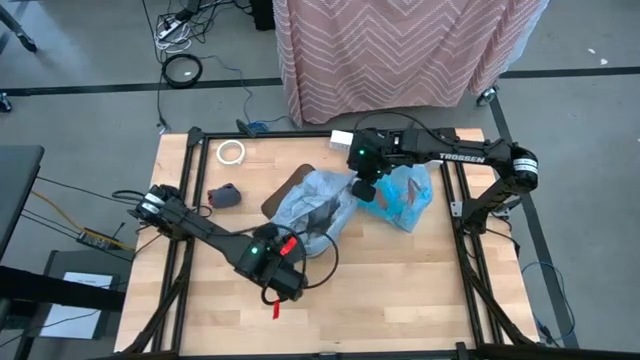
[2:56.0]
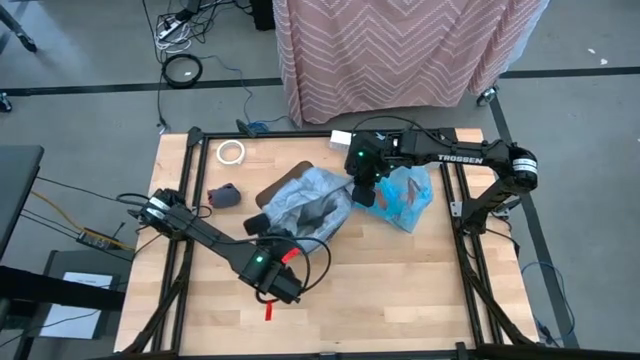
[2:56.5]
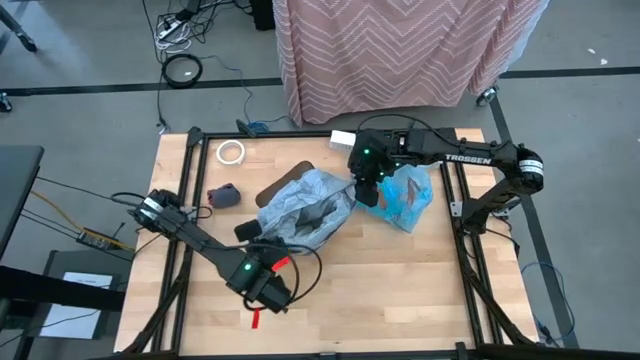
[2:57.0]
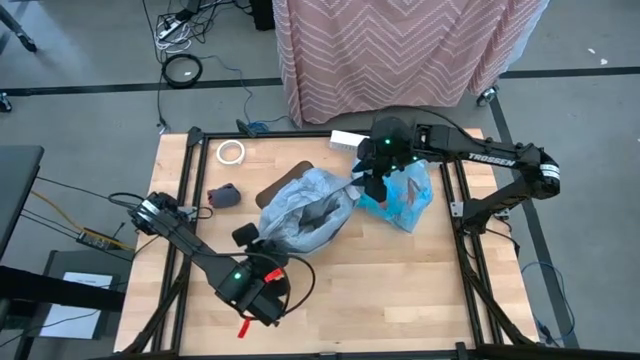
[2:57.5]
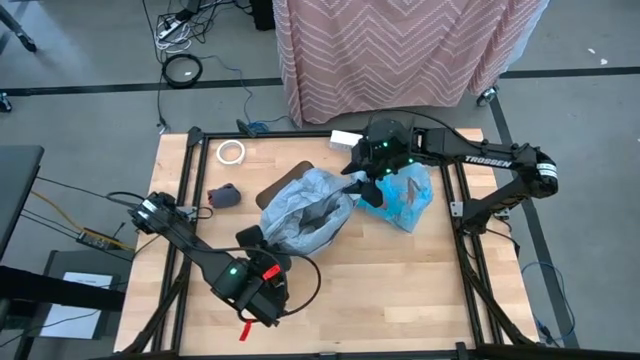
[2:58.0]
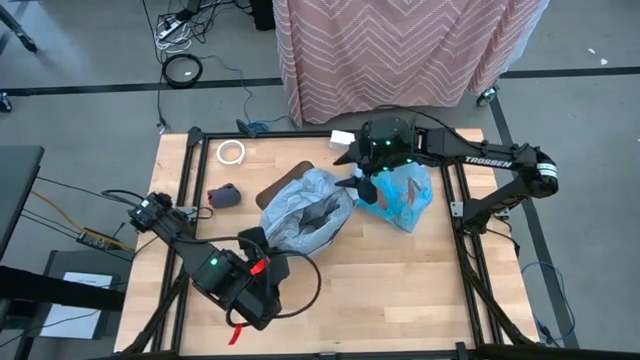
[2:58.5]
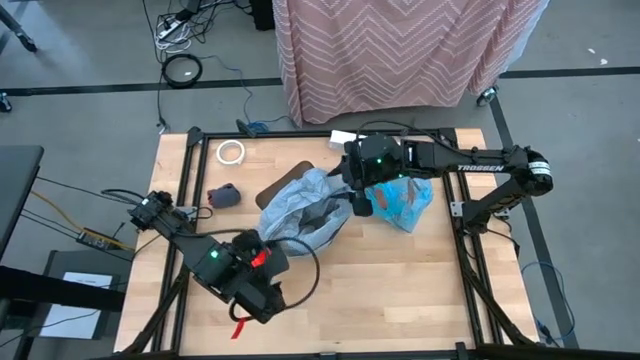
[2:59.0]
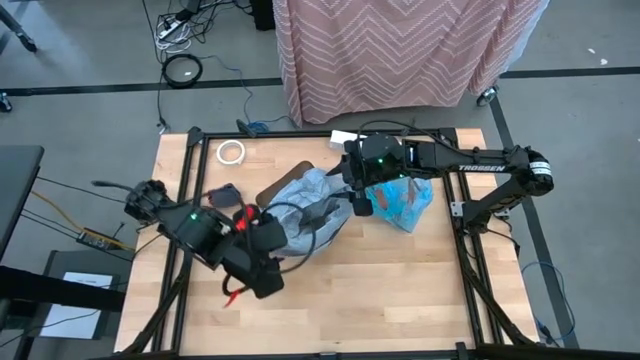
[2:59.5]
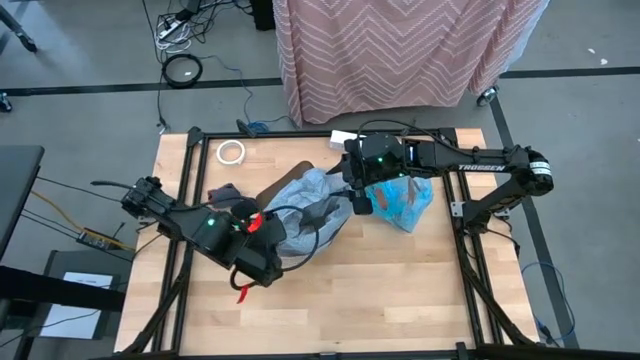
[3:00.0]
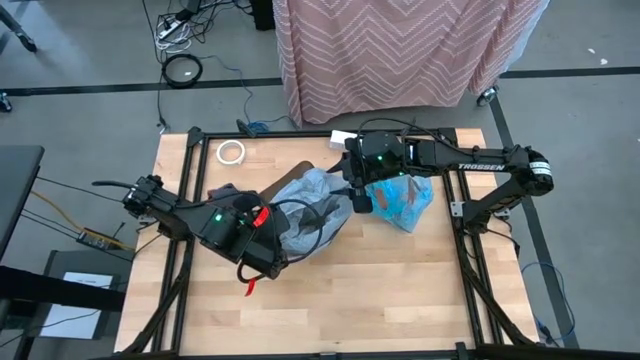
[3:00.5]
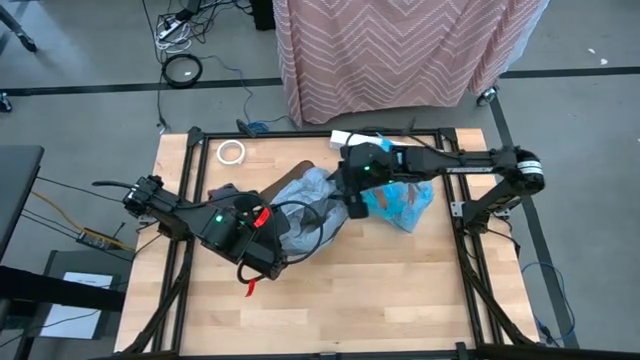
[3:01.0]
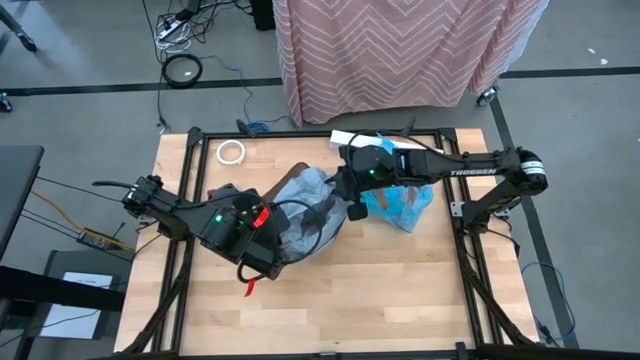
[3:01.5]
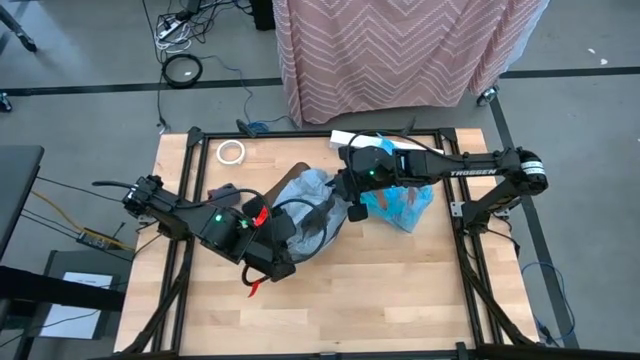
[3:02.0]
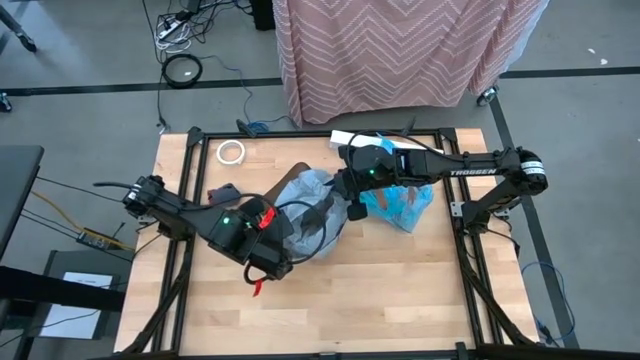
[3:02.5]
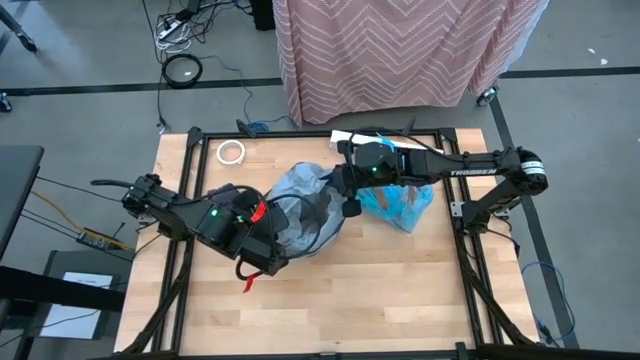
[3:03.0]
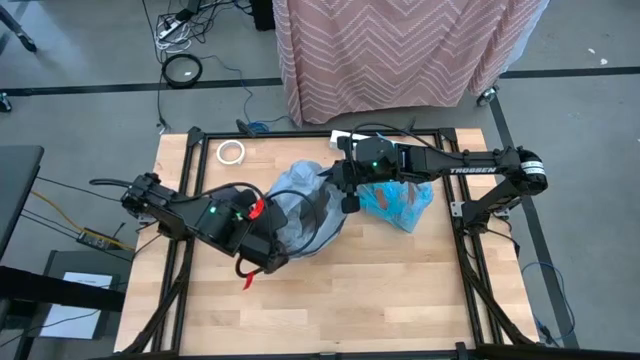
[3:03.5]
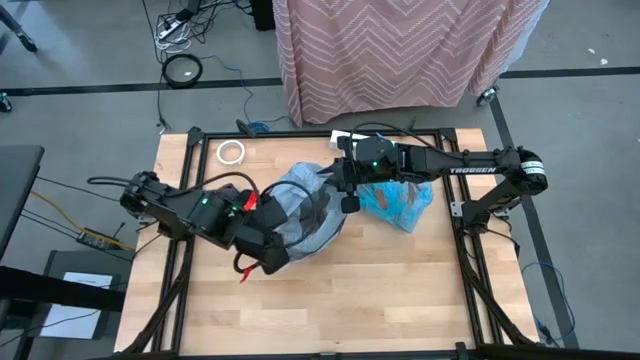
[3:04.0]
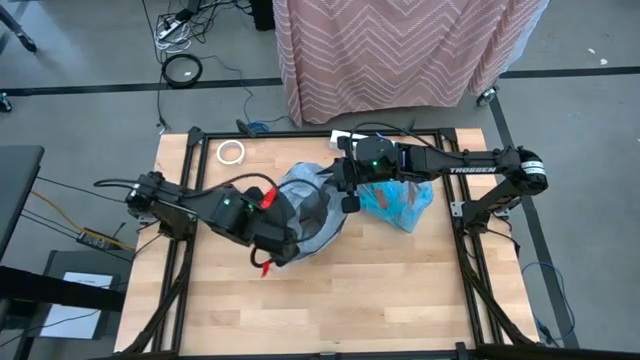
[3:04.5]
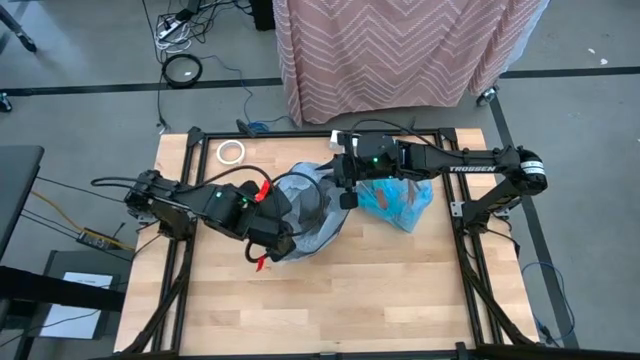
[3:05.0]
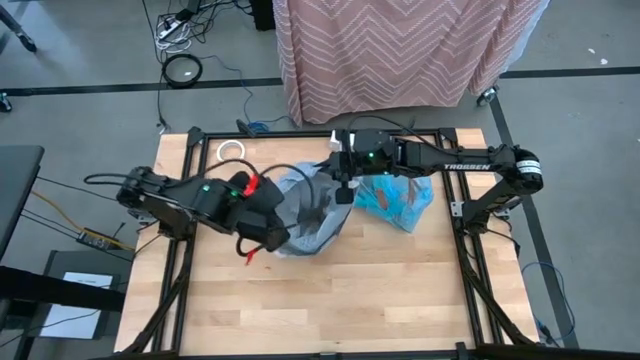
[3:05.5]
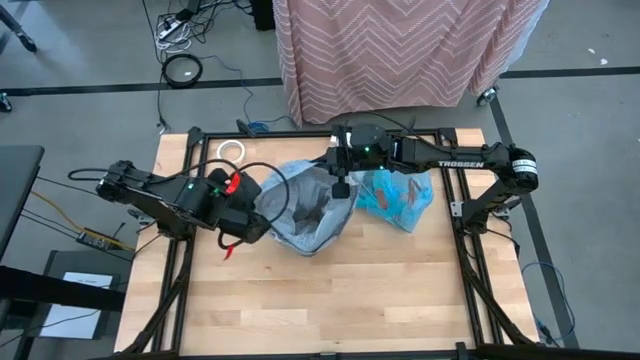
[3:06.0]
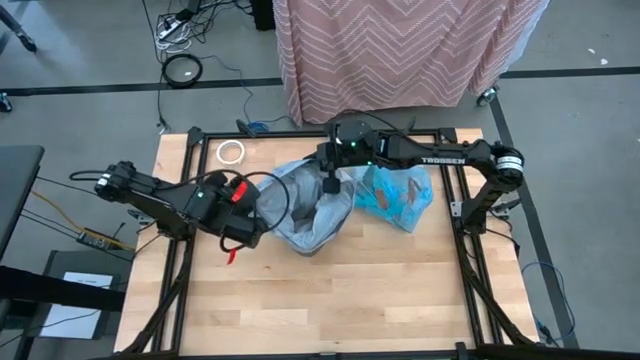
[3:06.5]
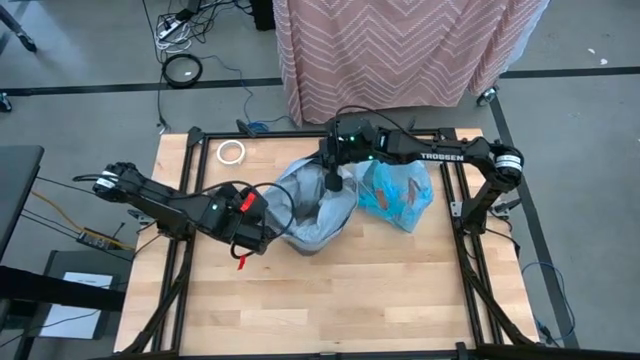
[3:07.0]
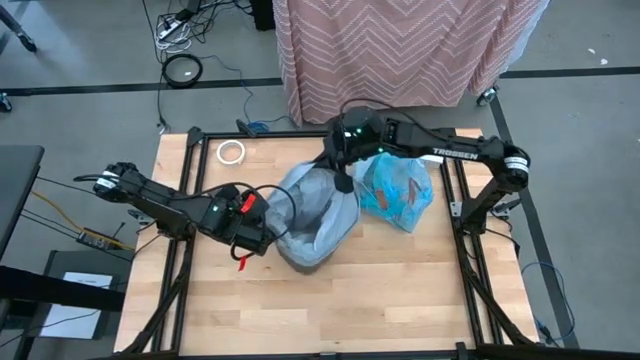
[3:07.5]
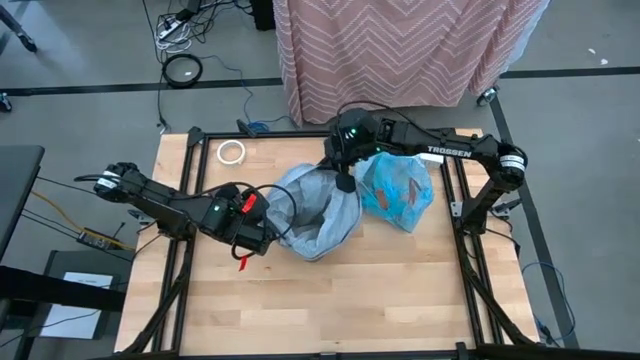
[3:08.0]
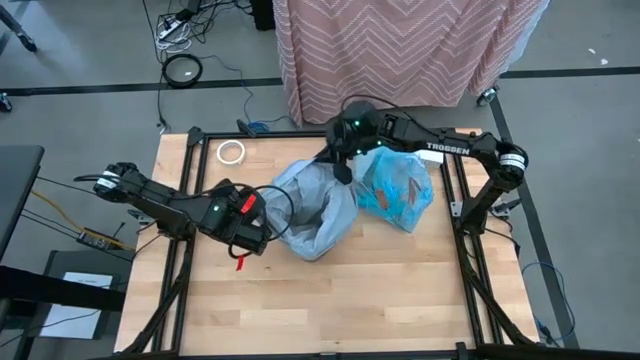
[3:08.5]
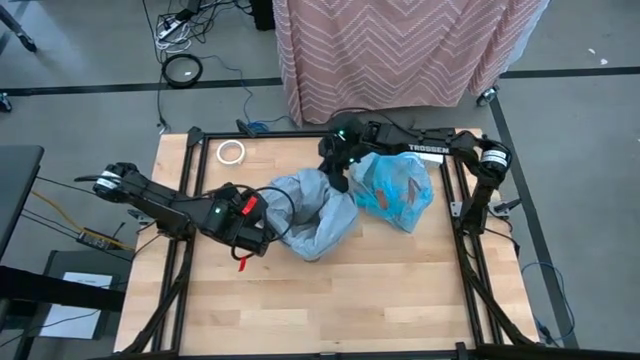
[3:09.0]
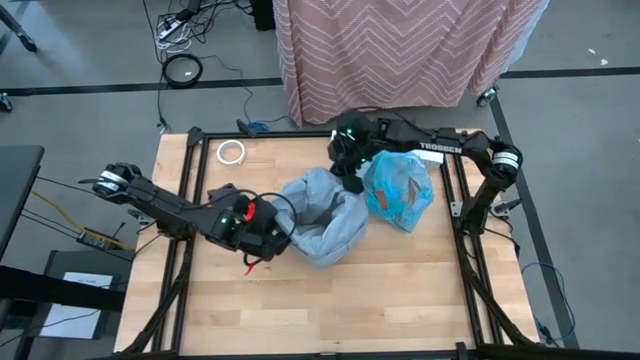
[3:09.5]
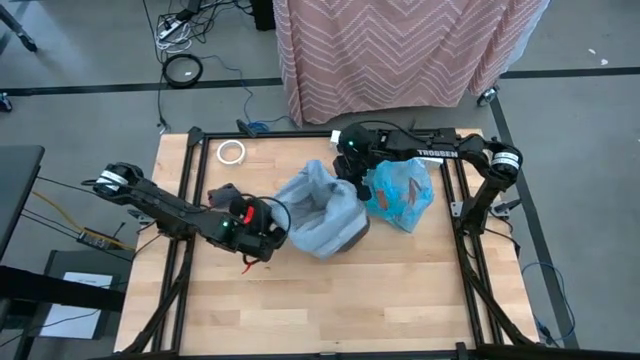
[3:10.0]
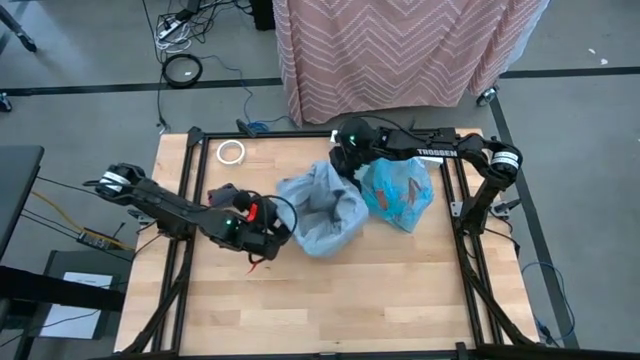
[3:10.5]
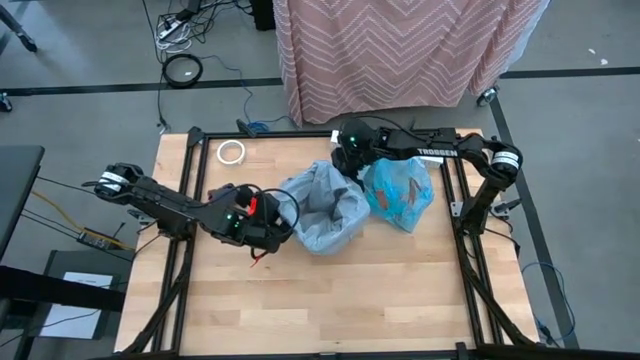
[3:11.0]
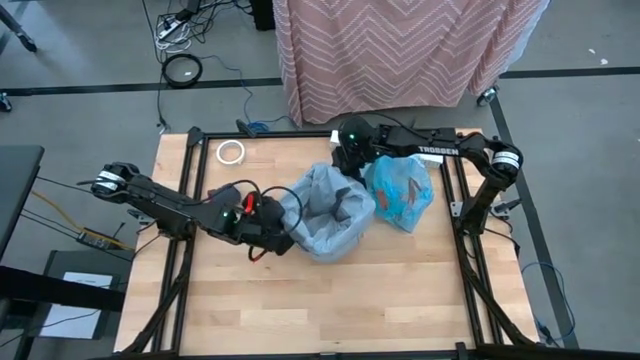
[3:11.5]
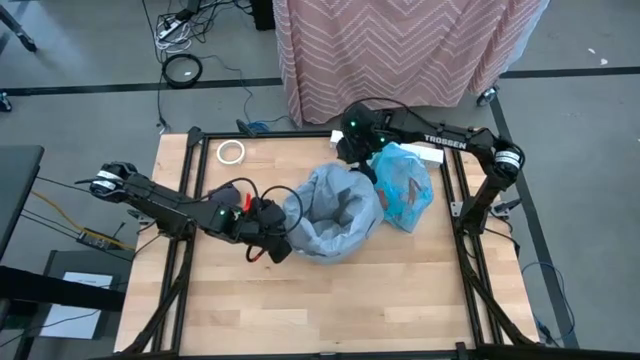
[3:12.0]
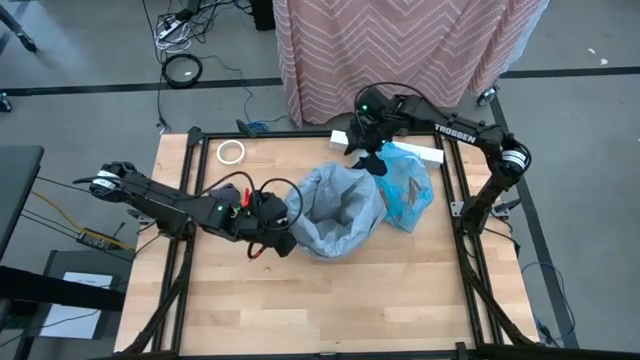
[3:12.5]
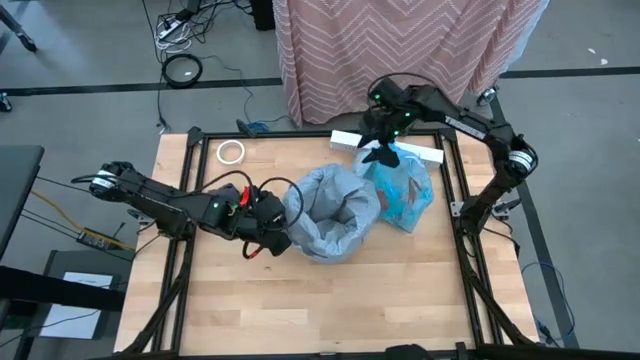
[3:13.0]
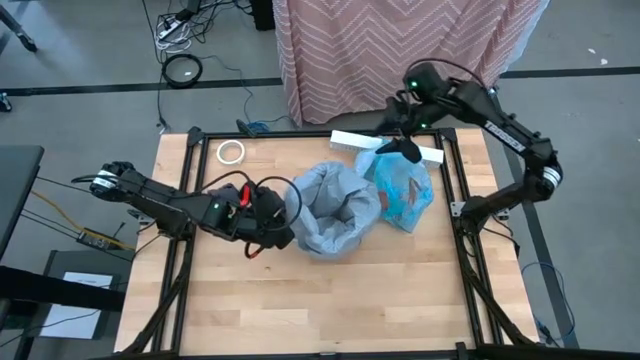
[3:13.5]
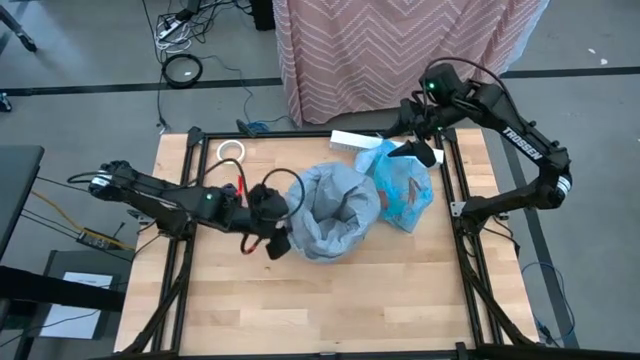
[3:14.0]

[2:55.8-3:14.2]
Task: place trash/remove bag and relplace
Put the gray trash bag into the black trash bin

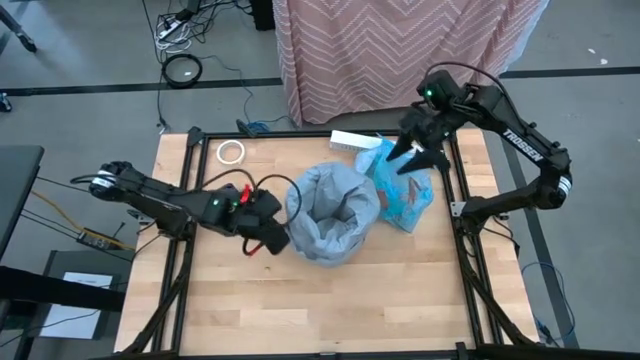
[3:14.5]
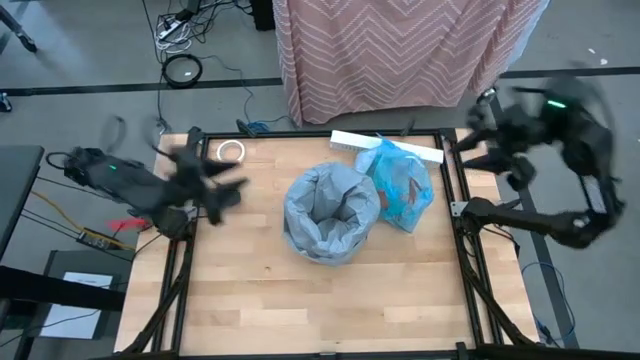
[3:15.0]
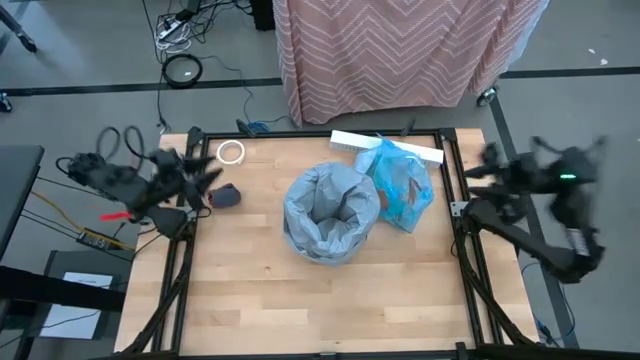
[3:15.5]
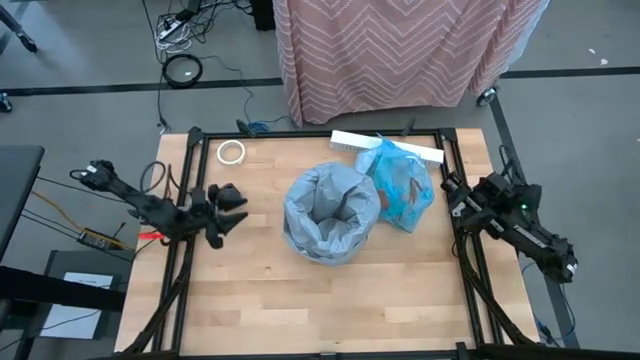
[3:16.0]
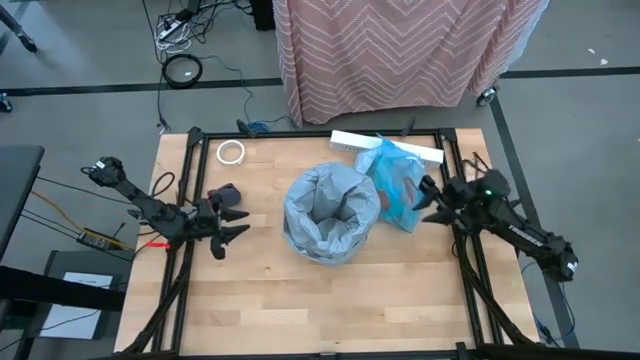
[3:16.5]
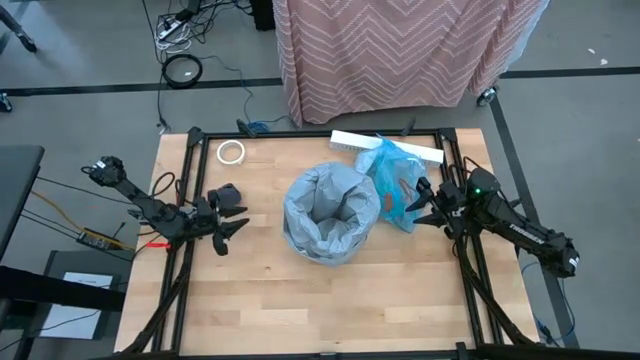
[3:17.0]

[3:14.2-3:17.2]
Return to Home Position
